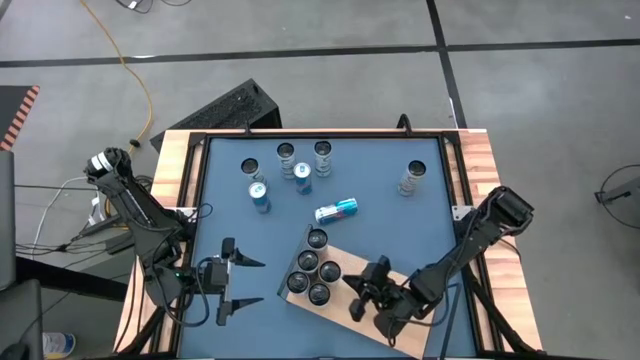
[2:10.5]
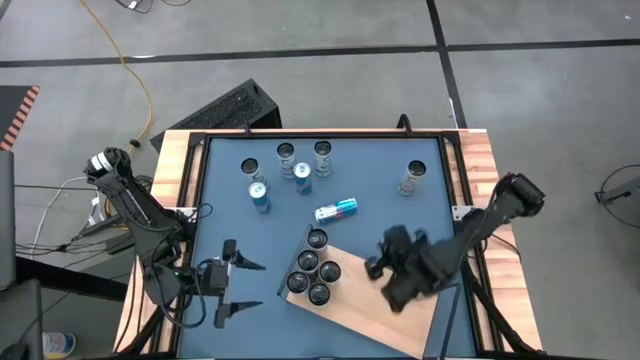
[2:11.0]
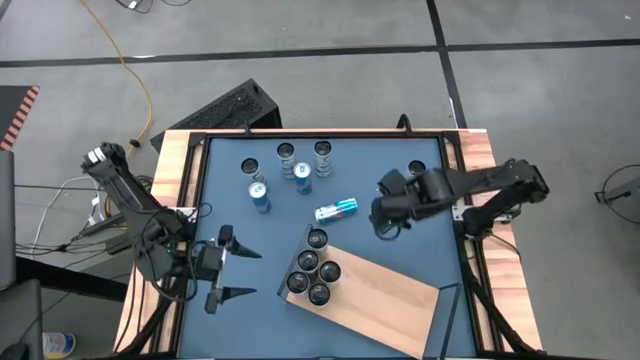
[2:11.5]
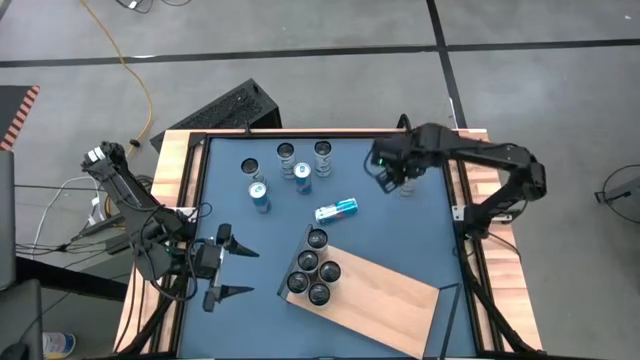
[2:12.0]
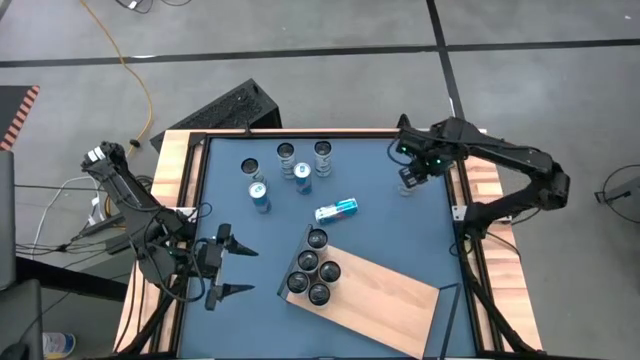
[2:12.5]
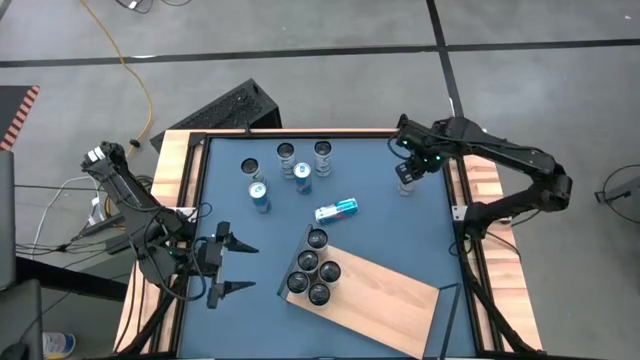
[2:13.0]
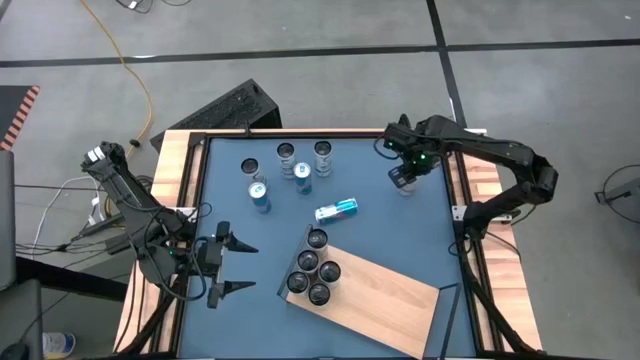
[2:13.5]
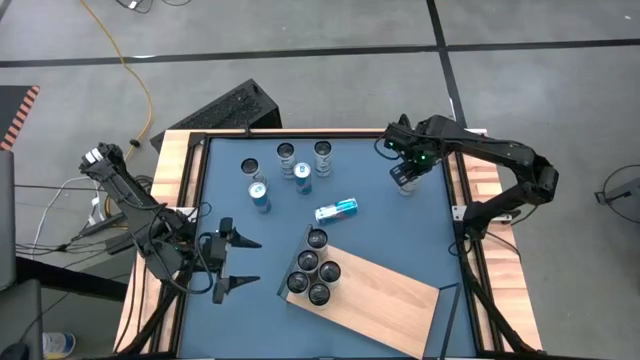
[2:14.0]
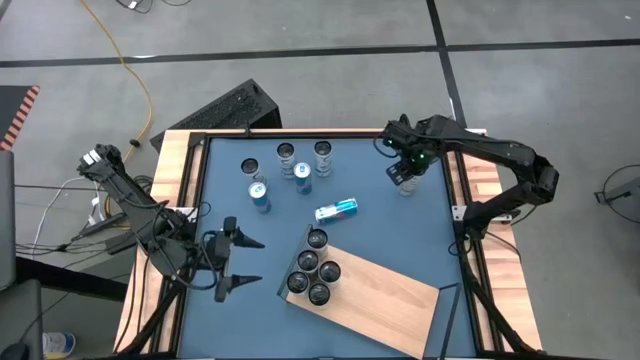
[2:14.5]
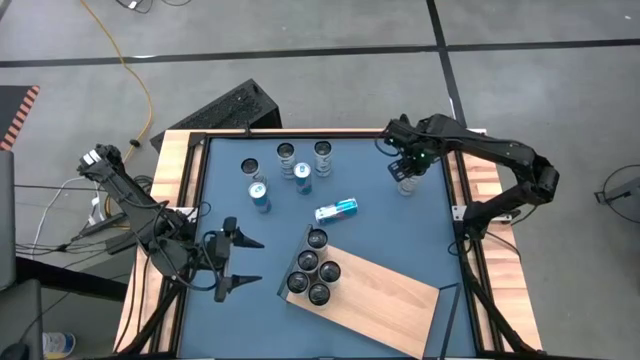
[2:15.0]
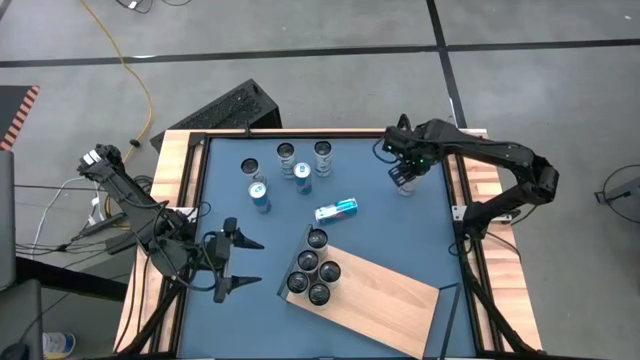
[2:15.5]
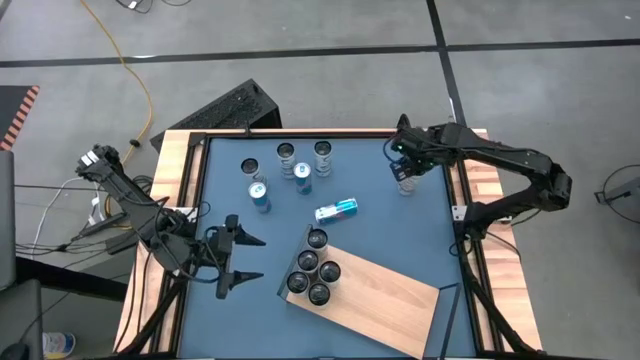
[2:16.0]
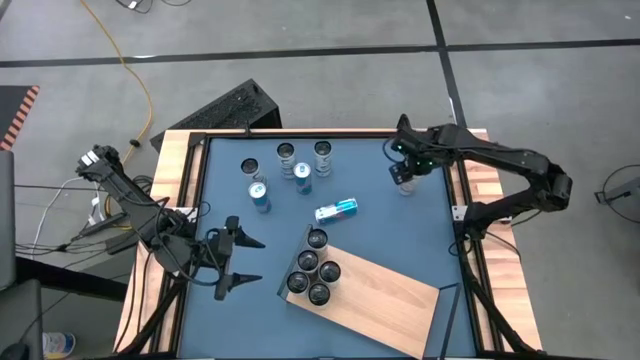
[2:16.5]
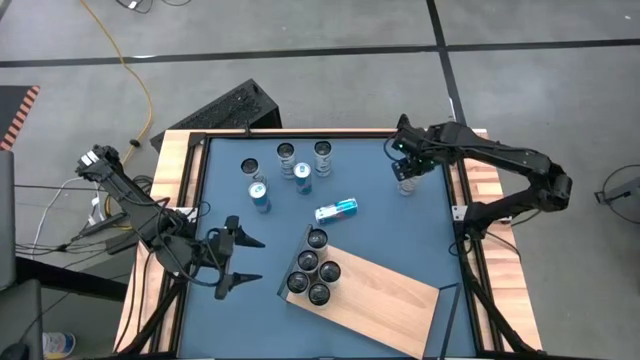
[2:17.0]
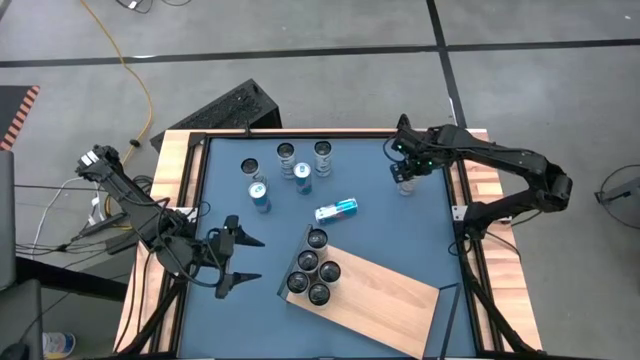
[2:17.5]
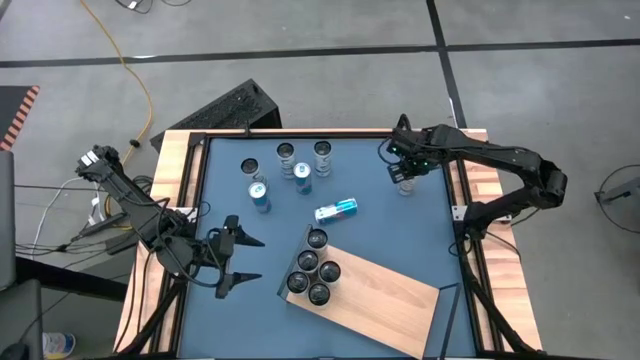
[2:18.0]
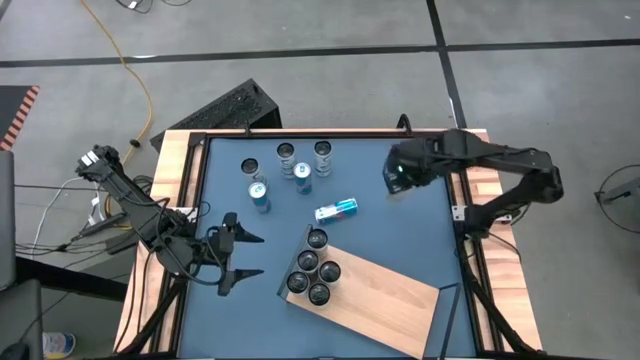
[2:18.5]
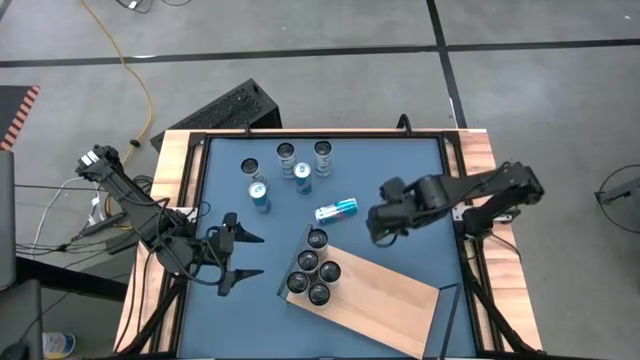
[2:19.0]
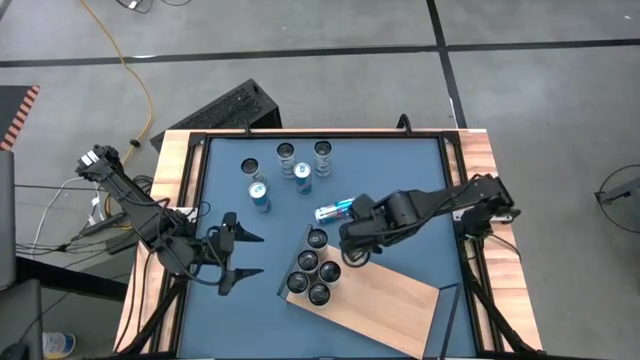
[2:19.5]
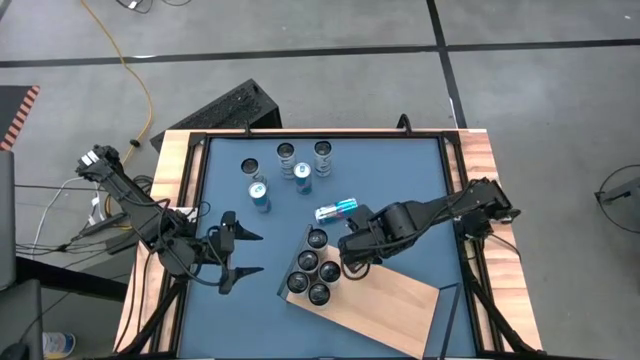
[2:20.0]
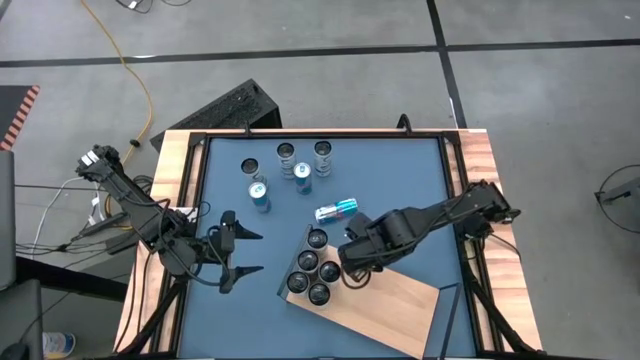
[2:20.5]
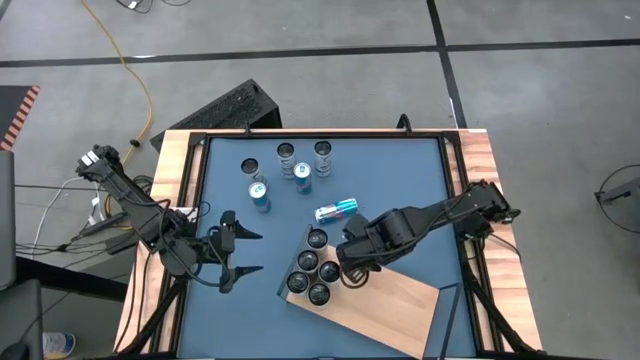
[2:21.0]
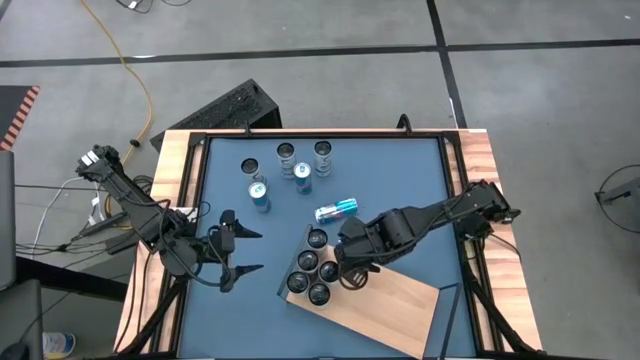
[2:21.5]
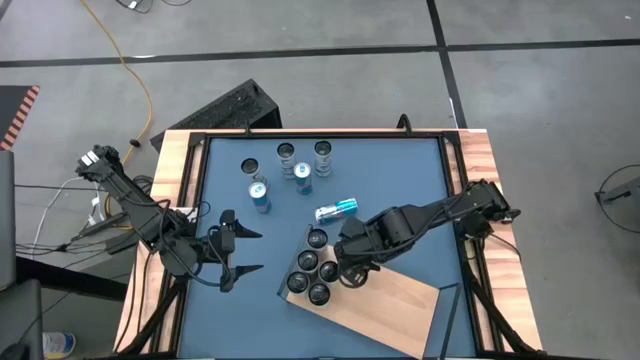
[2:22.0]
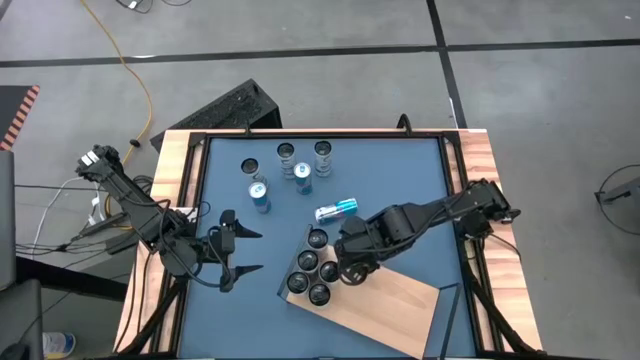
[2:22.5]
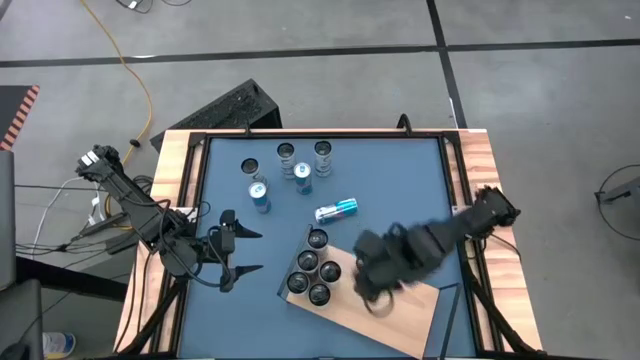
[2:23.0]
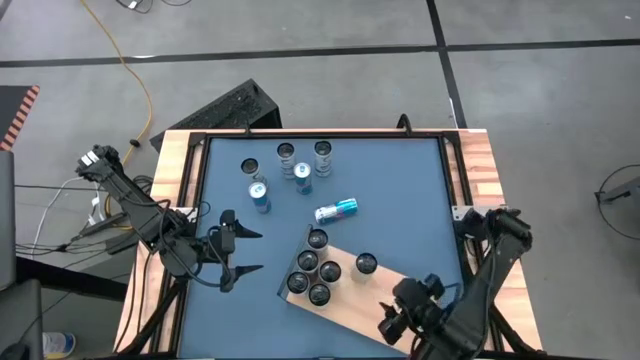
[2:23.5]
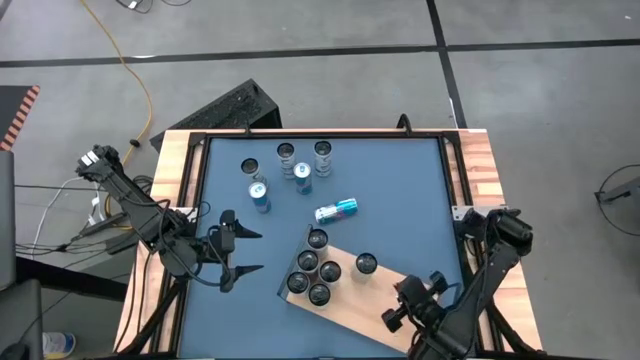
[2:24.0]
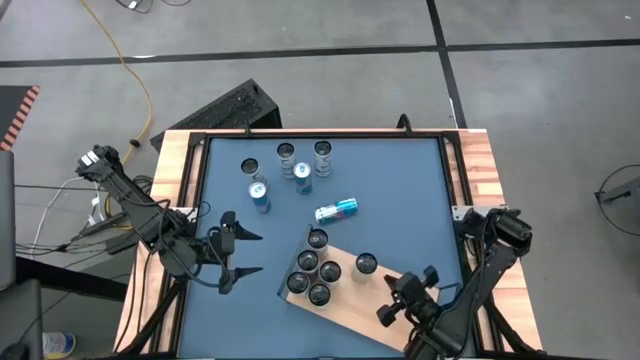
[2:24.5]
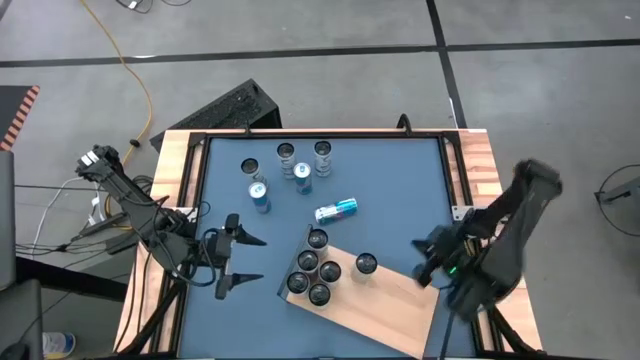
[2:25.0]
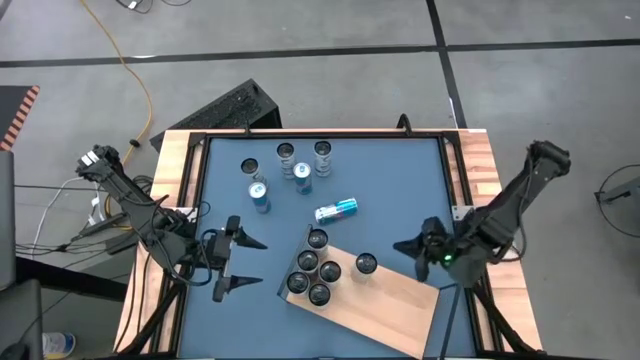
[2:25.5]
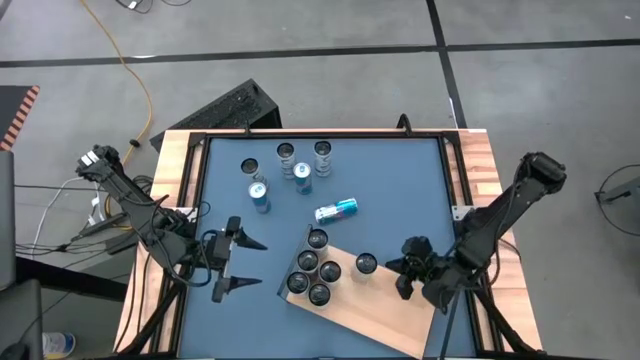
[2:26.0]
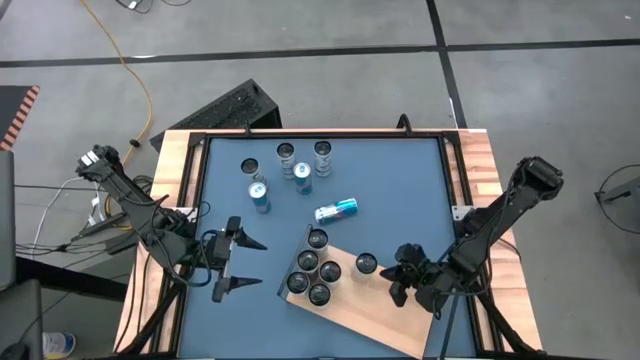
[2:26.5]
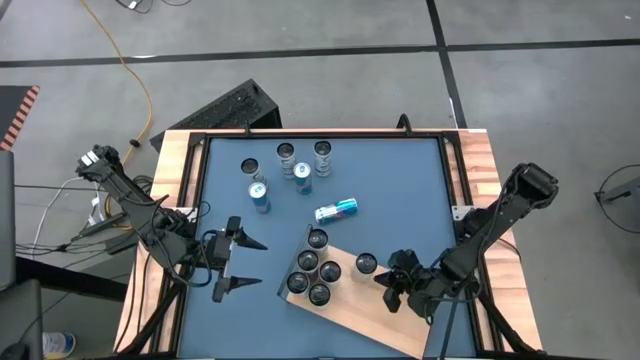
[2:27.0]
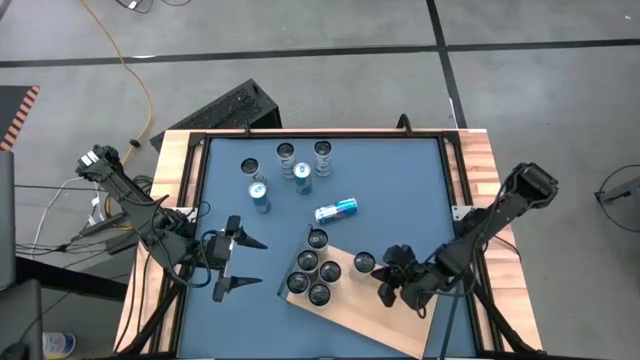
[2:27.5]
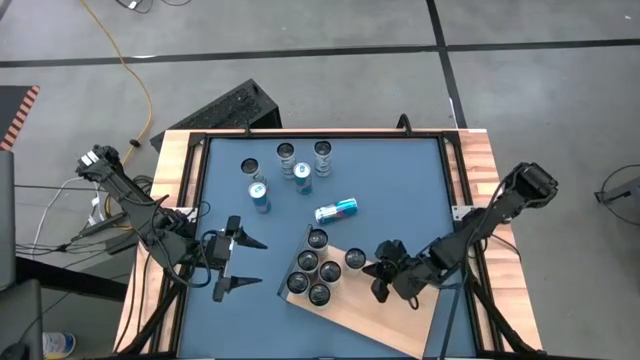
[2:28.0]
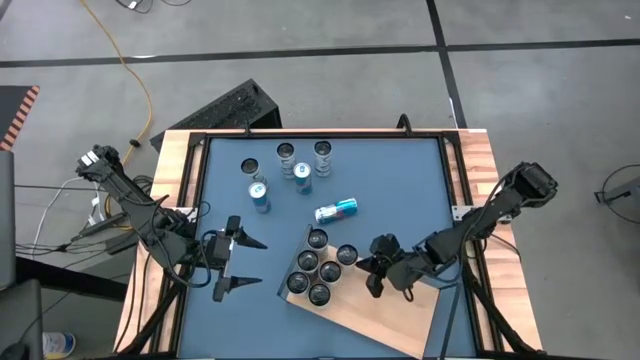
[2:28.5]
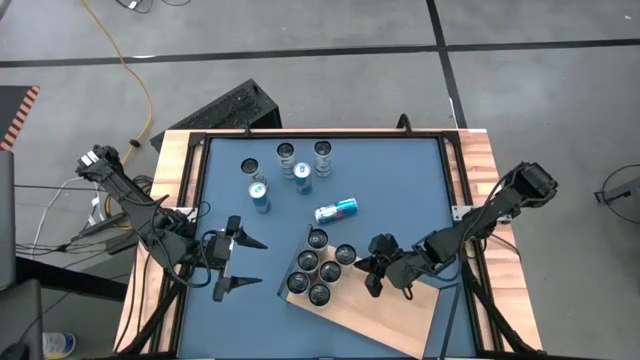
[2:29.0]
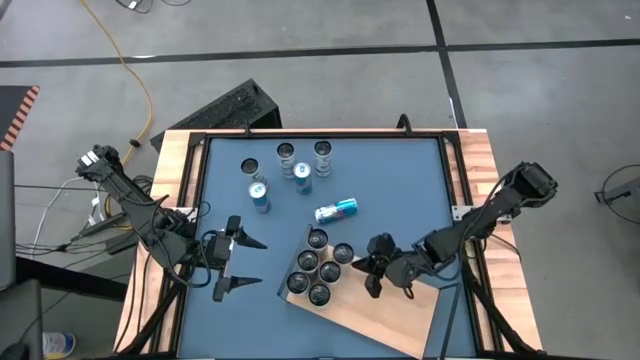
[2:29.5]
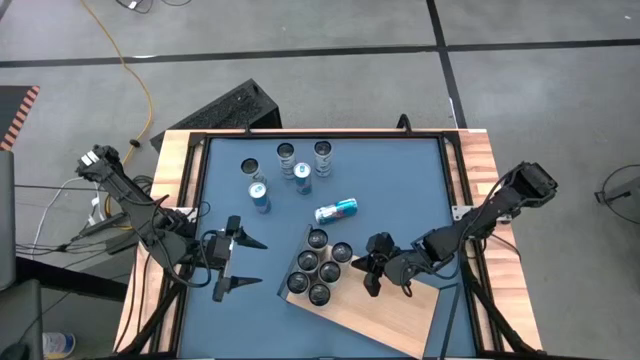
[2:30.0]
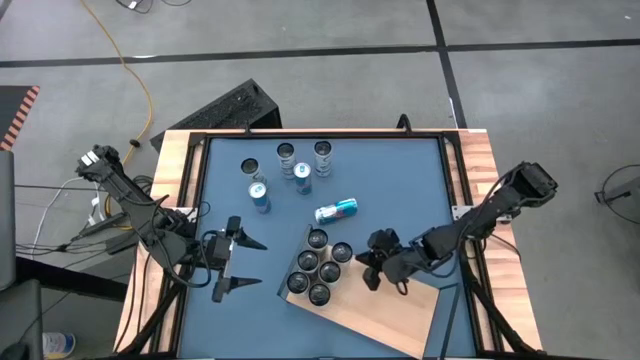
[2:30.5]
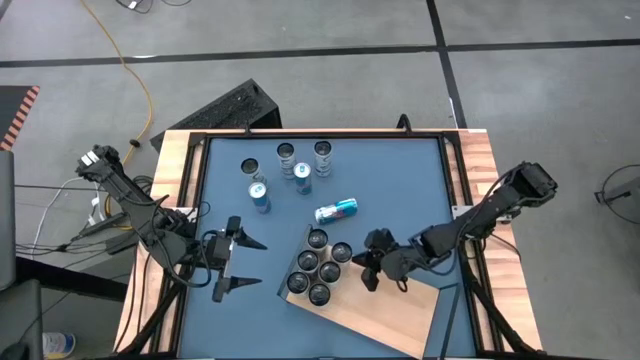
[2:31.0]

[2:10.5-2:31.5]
Task: Place canned beverage on shelf
Put the white yellow soda can aligned with the other white yellow soda can on the shelf
